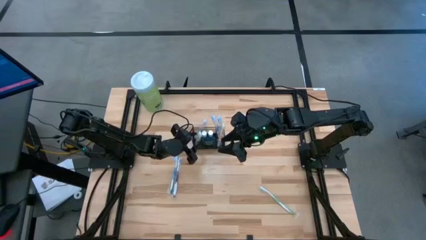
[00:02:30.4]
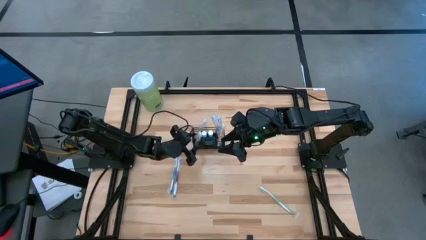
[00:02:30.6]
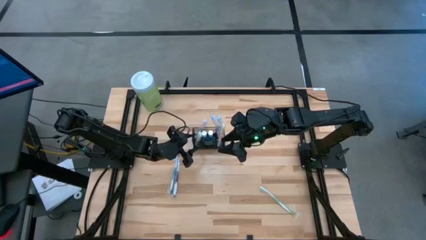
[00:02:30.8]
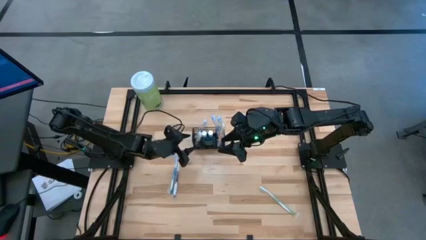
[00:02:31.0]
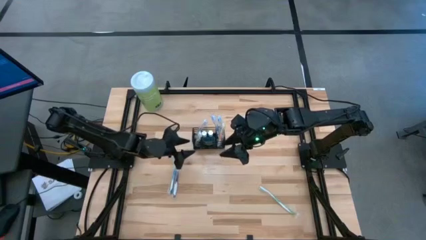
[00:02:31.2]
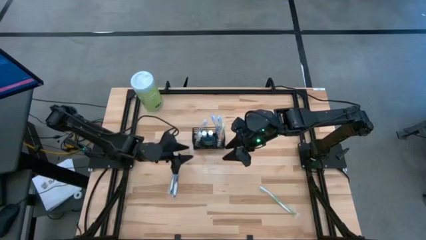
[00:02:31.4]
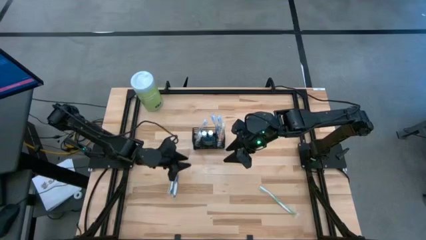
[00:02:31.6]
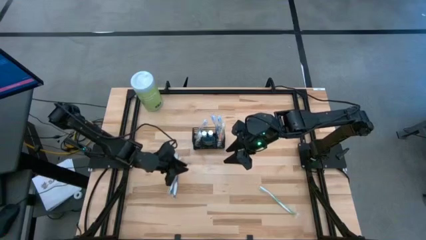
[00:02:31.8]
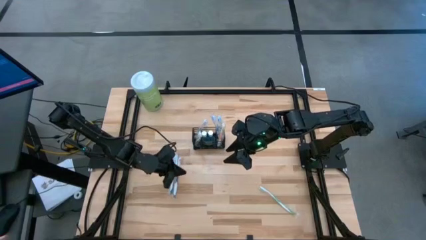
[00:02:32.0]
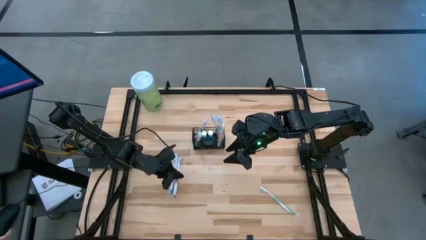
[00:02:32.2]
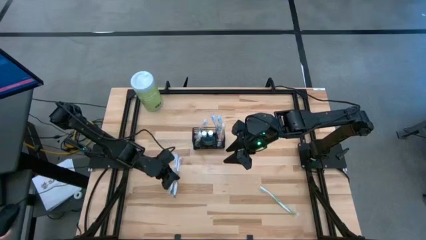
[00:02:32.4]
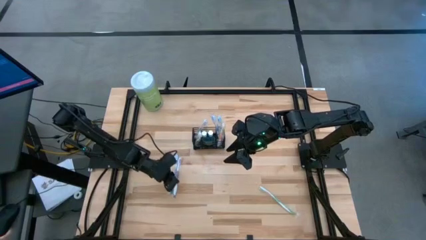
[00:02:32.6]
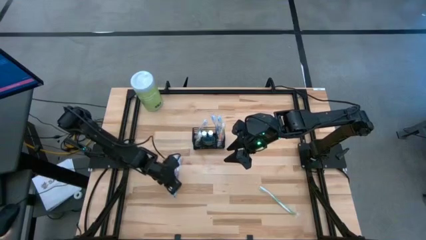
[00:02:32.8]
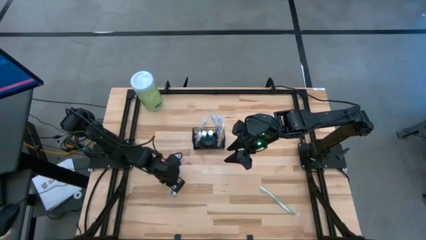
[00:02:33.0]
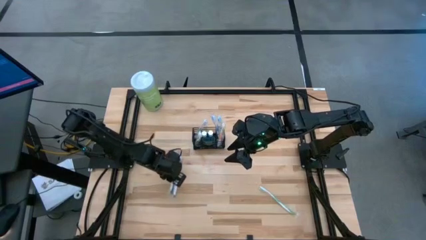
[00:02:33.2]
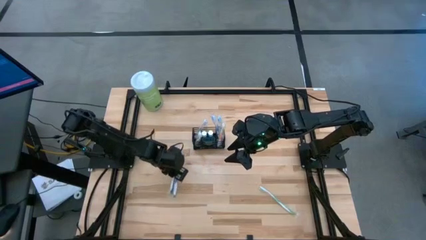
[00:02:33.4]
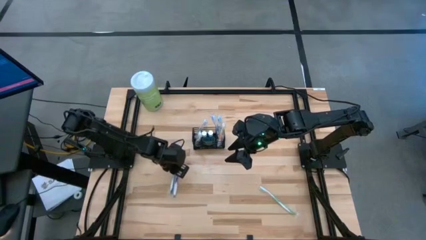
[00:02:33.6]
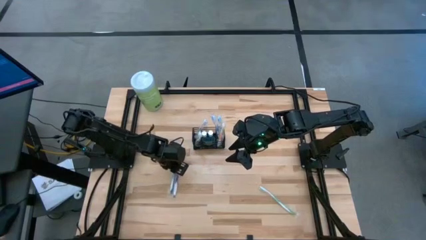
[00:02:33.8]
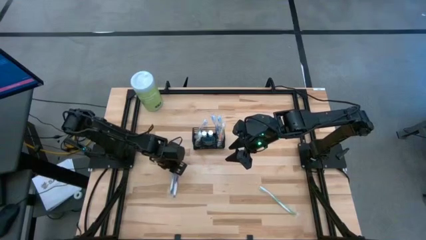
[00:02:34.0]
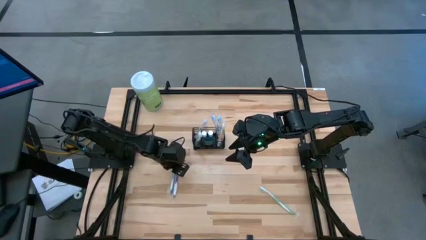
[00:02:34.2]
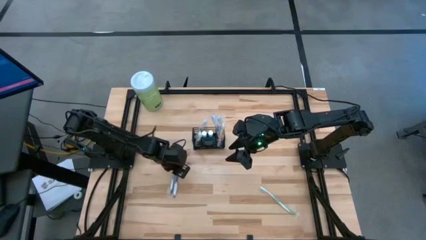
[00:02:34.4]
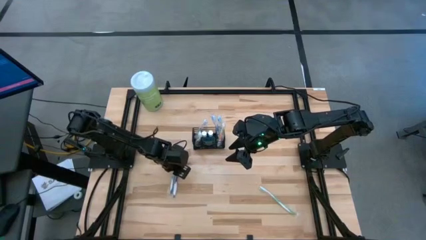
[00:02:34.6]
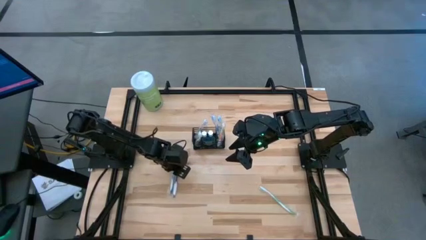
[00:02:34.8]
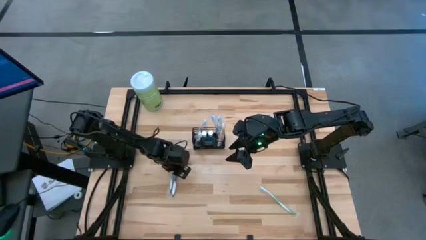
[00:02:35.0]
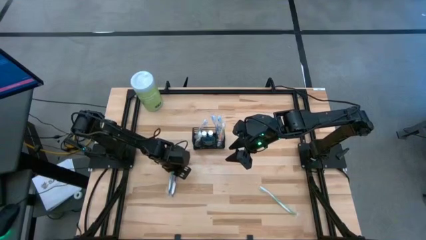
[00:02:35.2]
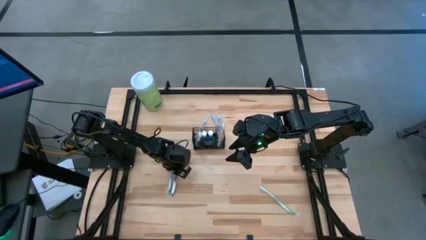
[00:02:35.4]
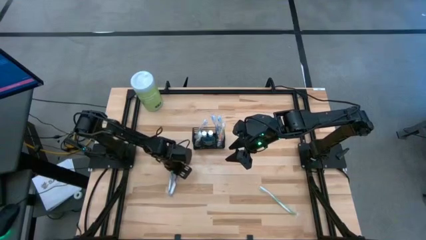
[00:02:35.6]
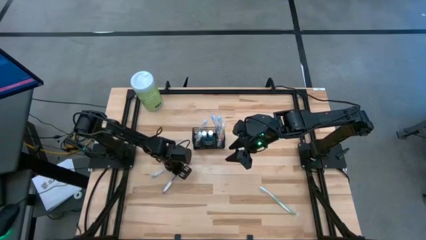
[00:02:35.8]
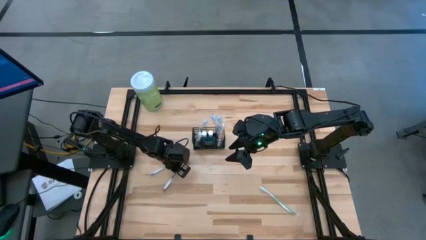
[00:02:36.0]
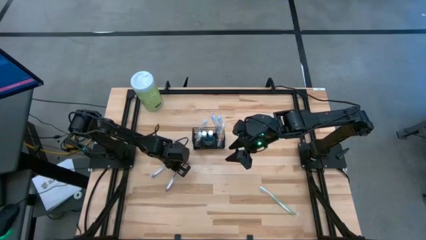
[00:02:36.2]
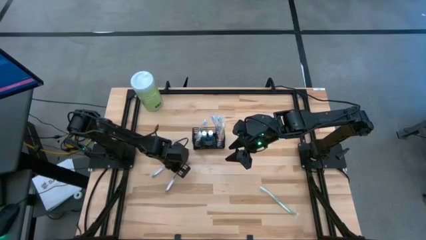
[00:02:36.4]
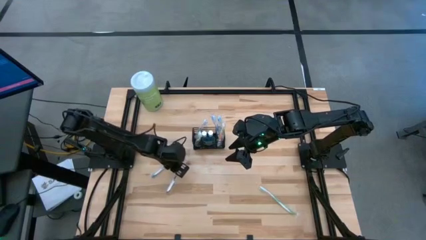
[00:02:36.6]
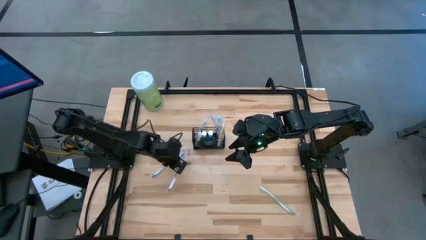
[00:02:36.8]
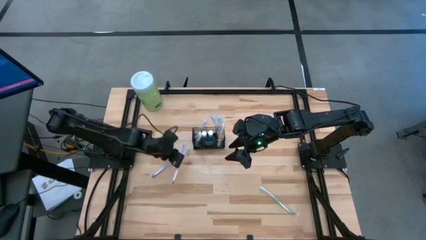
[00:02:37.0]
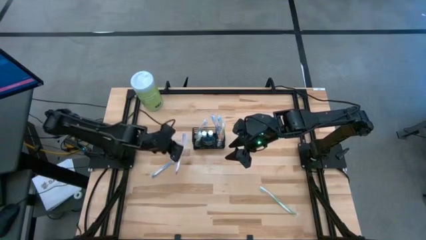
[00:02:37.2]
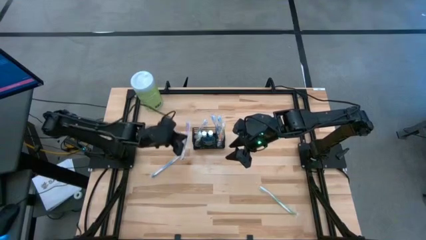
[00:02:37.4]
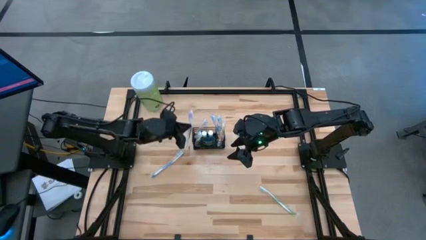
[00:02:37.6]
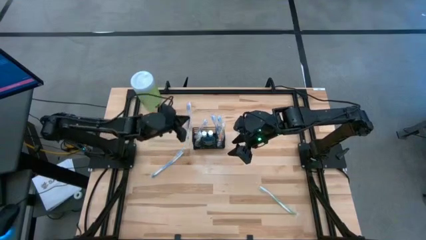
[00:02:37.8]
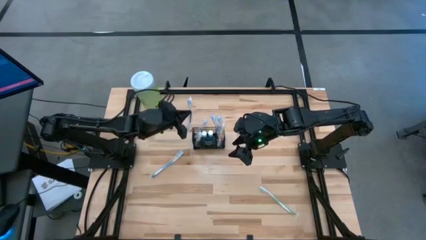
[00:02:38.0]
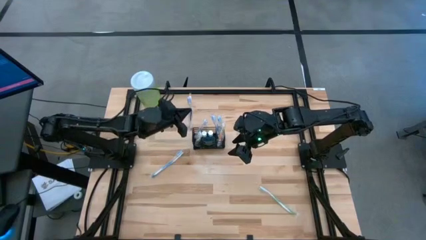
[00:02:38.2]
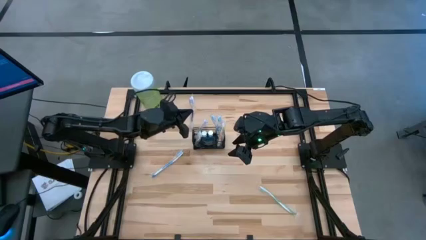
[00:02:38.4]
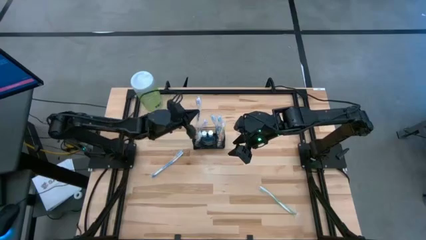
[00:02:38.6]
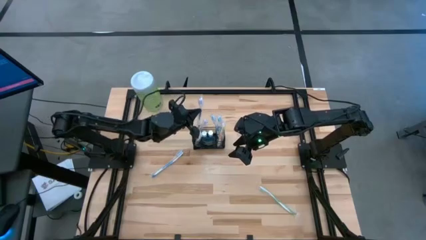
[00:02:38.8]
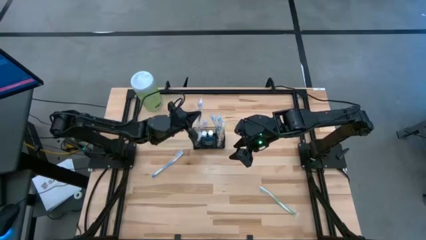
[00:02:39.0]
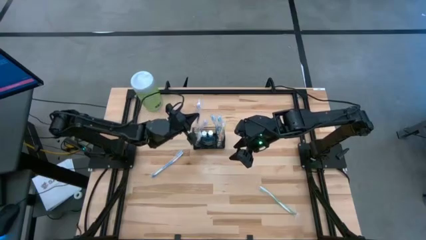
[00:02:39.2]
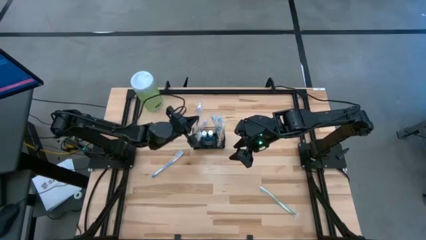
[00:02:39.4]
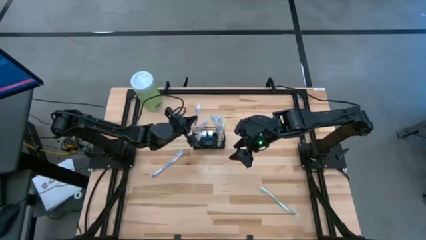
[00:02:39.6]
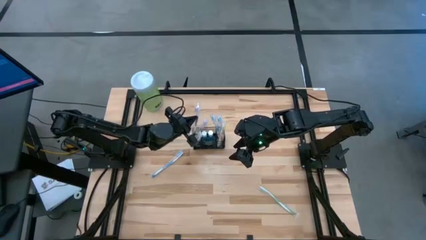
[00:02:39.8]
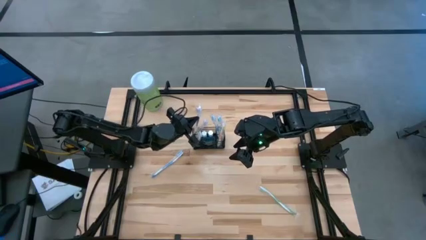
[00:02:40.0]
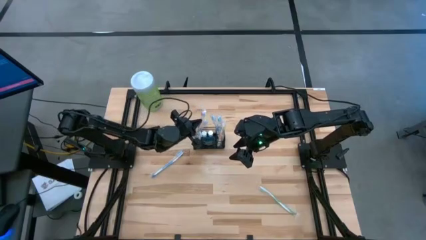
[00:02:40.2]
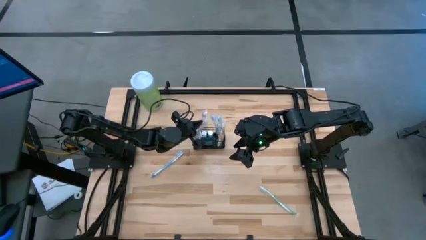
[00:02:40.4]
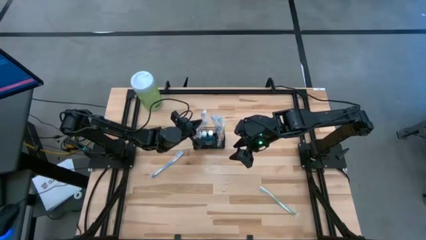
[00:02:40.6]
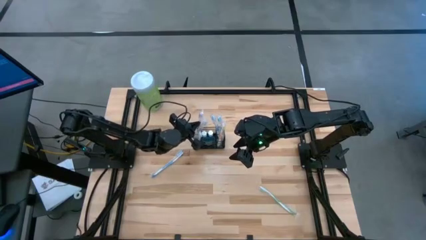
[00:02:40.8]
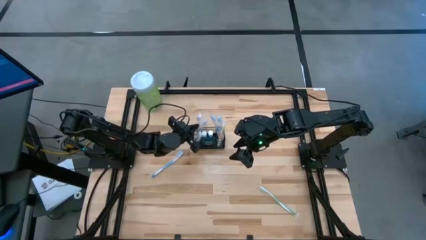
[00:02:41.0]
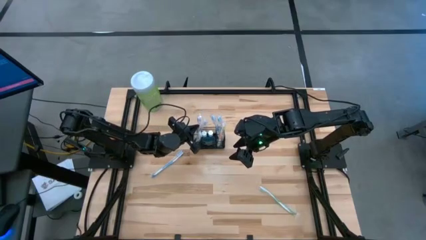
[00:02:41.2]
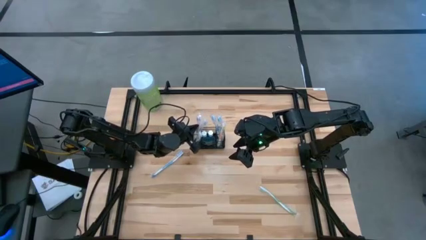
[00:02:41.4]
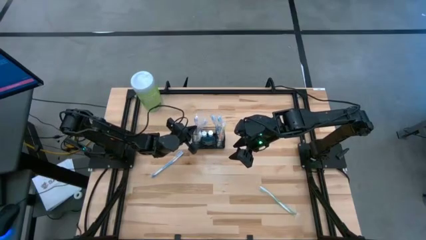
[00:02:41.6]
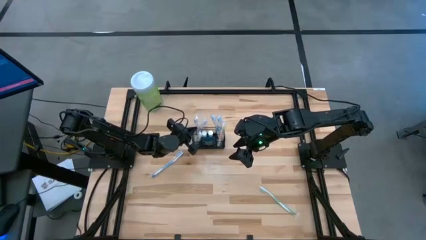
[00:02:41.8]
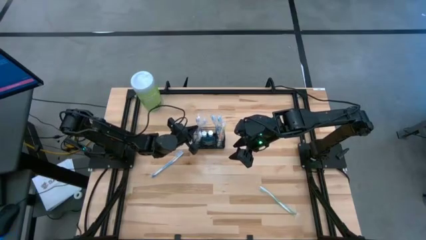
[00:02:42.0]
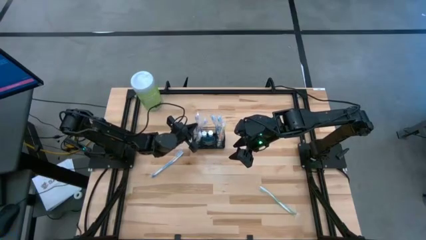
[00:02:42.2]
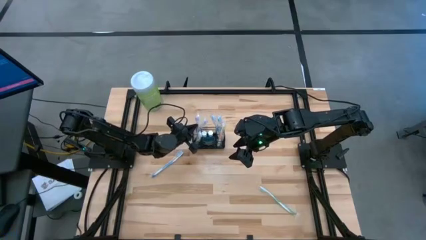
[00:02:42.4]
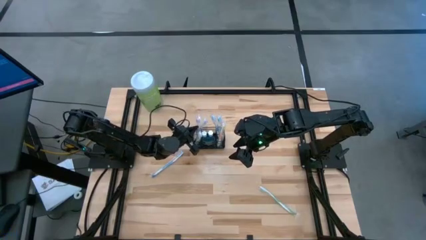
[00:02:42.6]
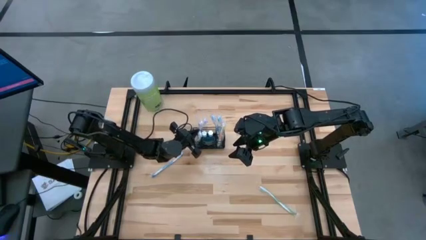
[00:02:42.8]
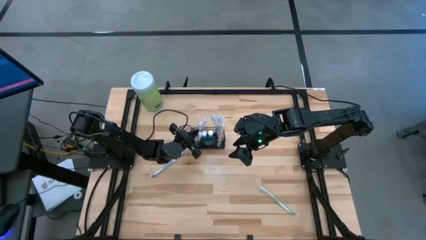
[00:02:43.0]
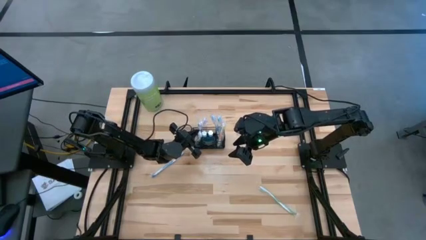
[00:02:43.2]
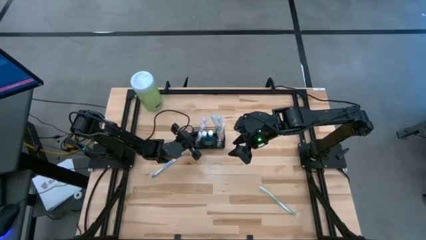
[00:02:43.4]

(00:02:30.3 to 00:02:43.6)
Task: Pick & Place toothbrushing station
Put the purple toothbrush into the black mesh organizer
